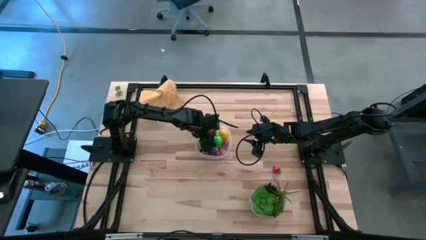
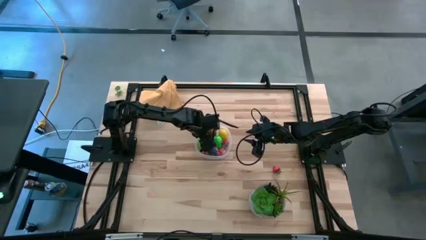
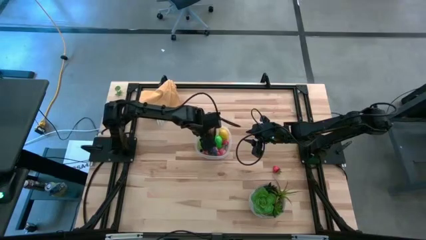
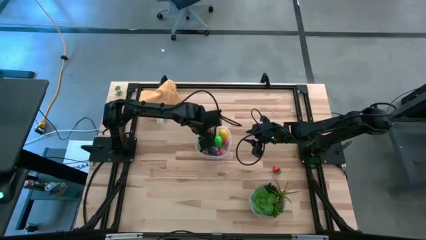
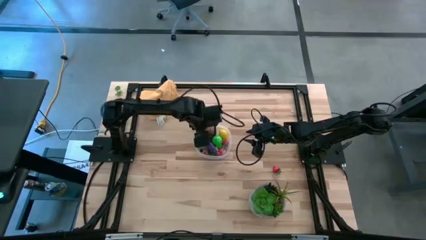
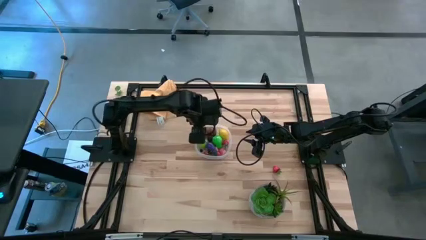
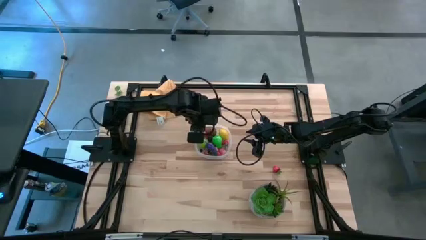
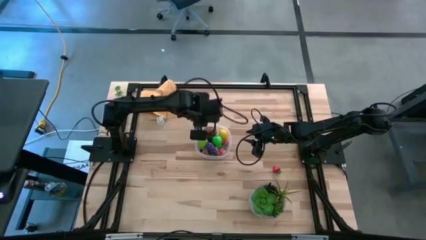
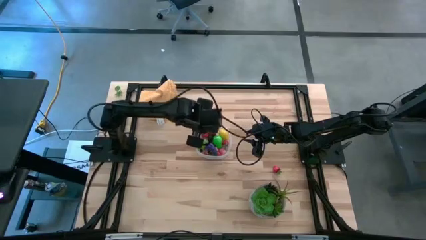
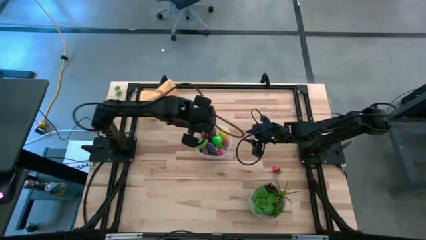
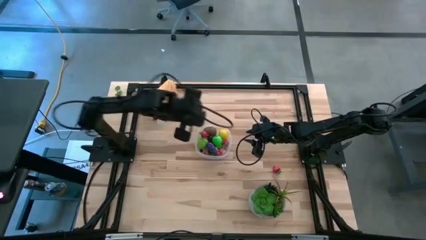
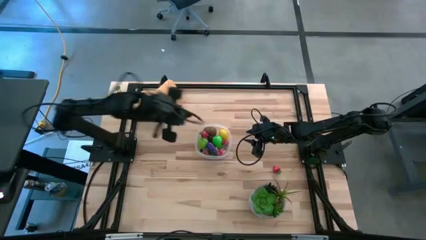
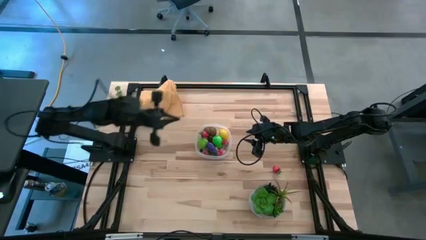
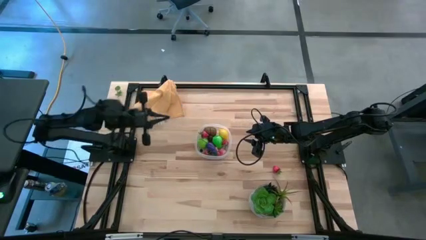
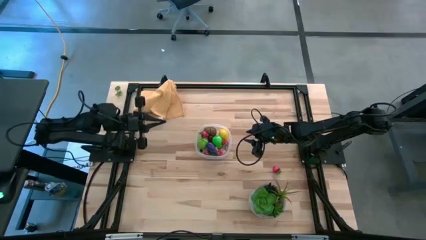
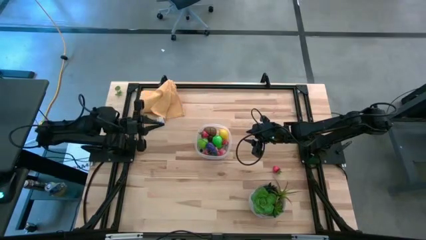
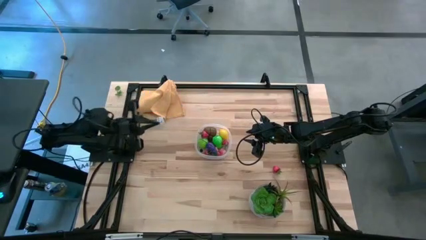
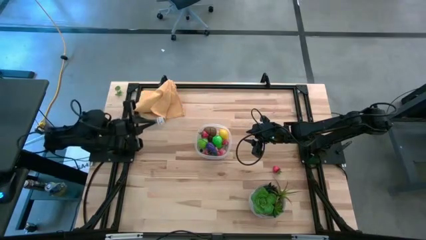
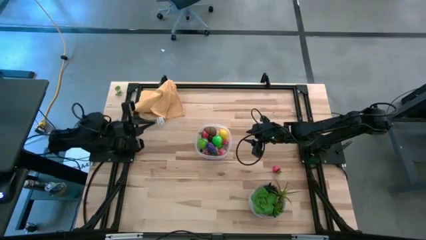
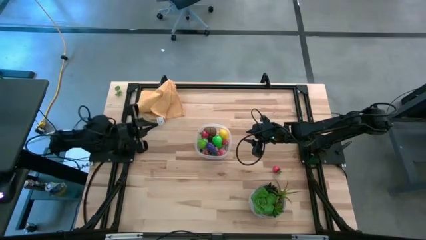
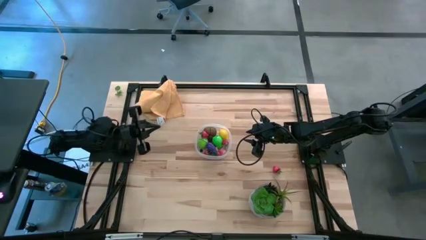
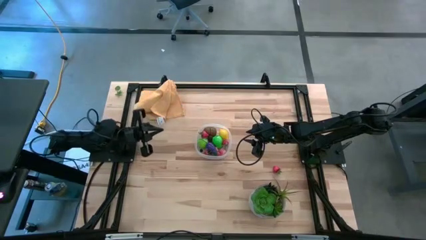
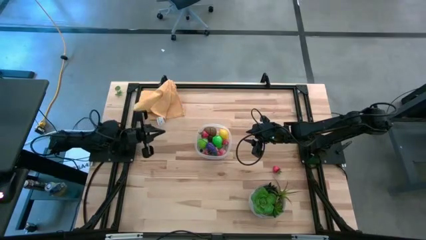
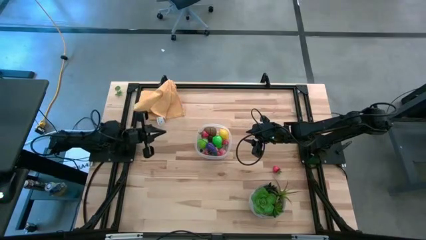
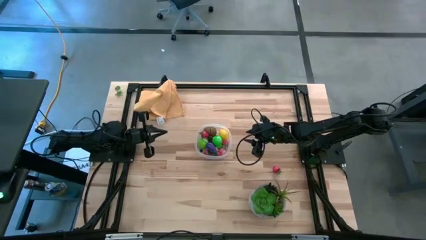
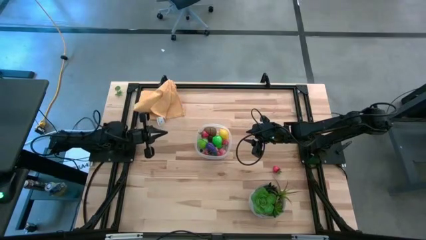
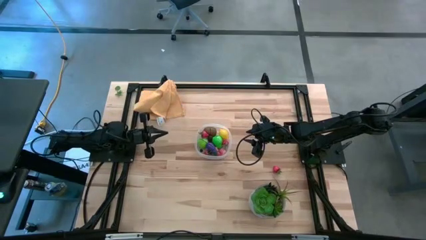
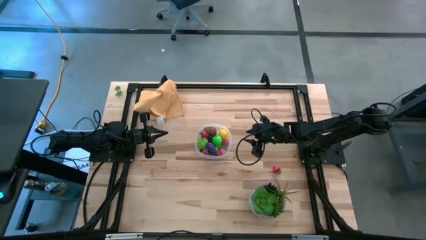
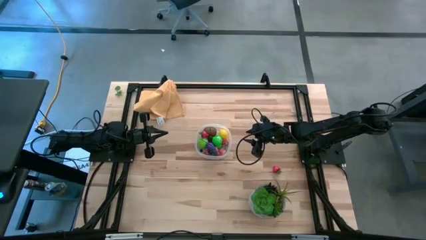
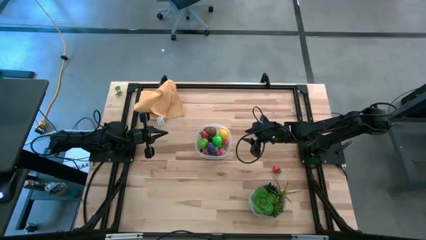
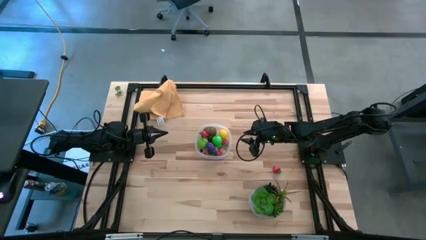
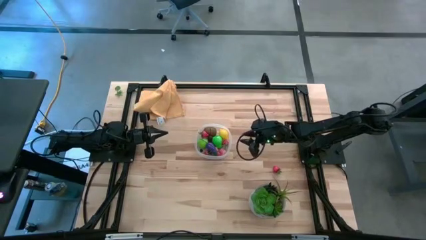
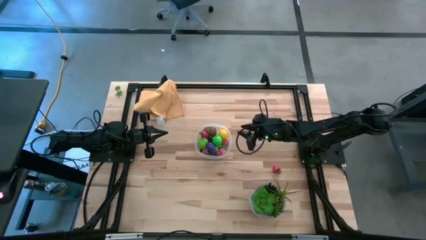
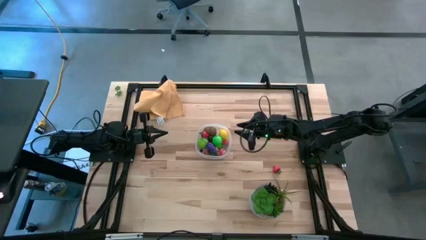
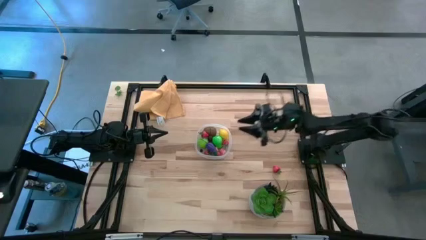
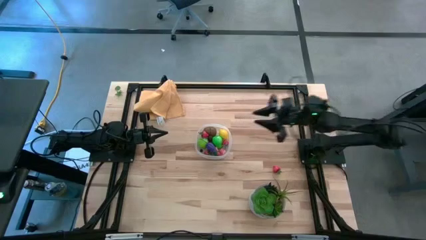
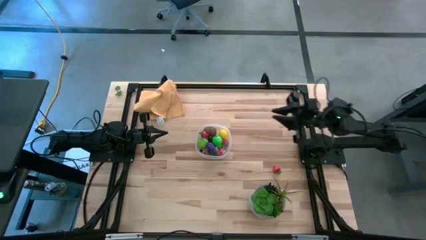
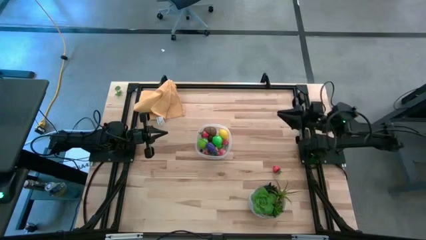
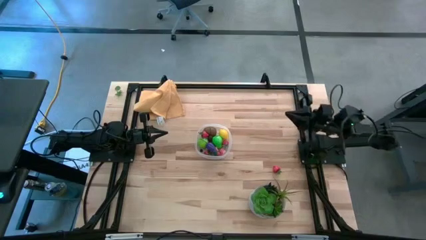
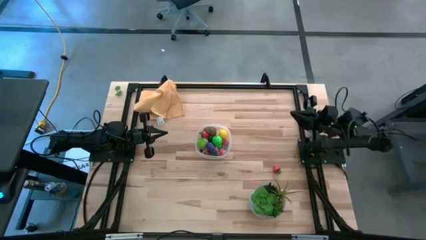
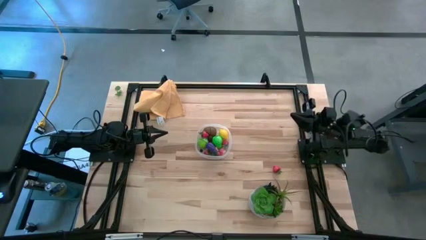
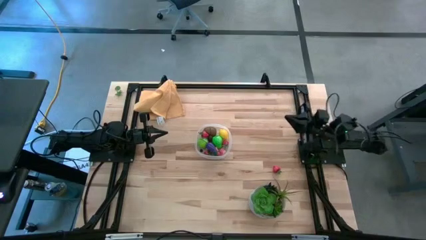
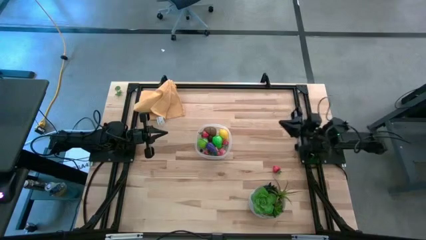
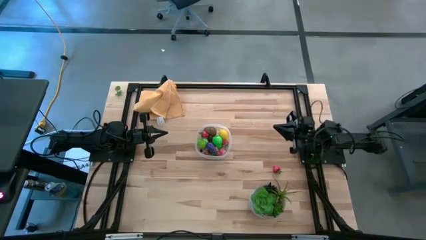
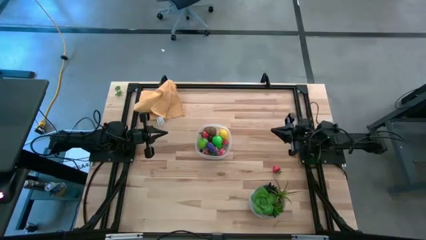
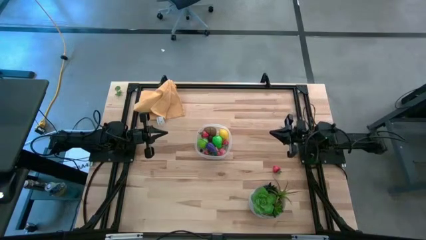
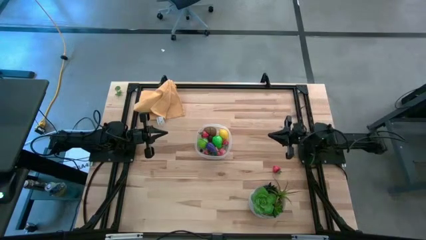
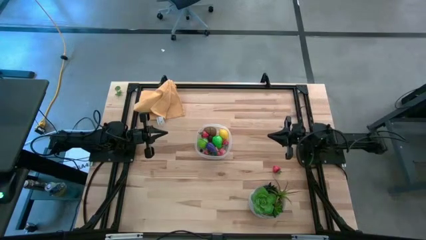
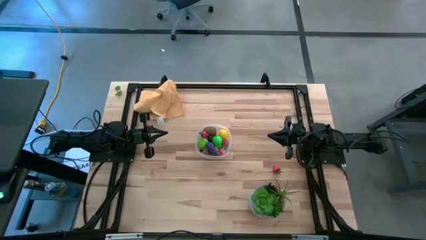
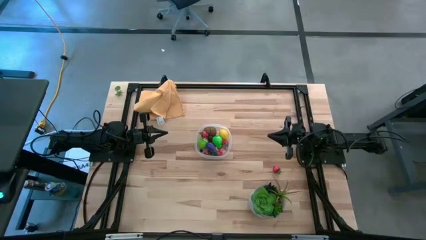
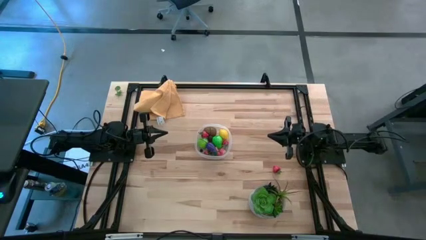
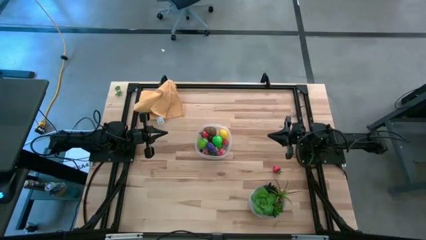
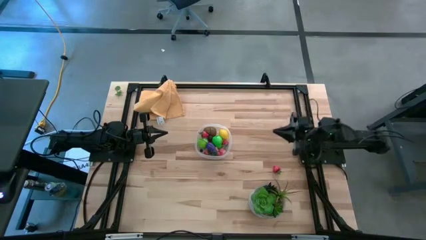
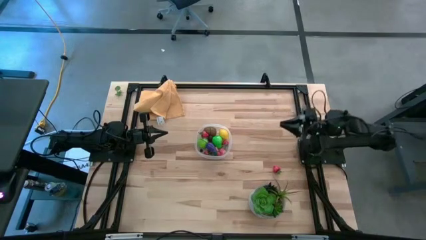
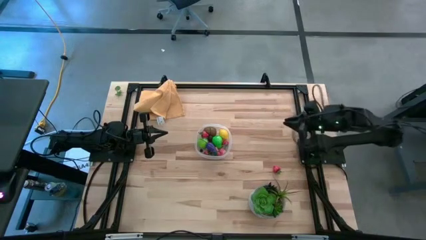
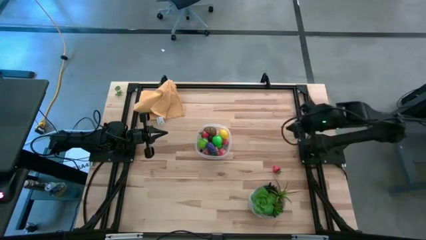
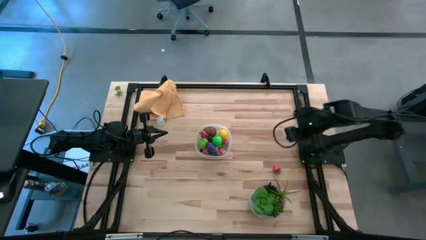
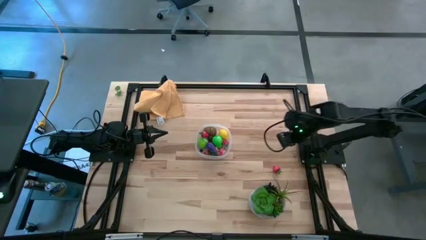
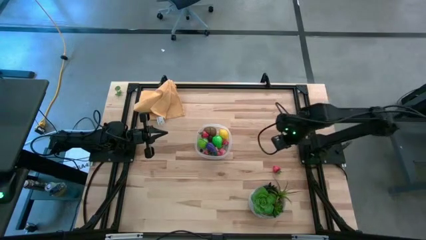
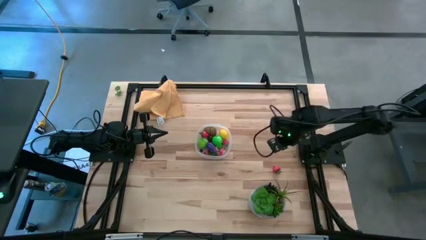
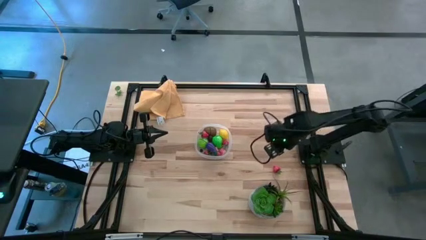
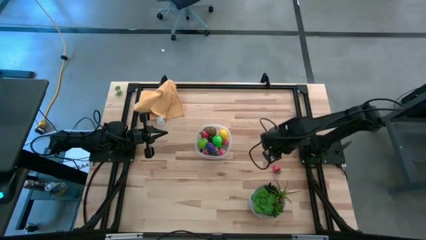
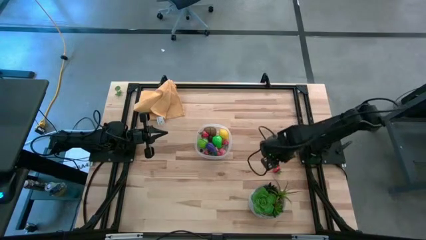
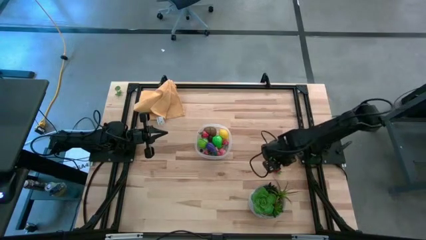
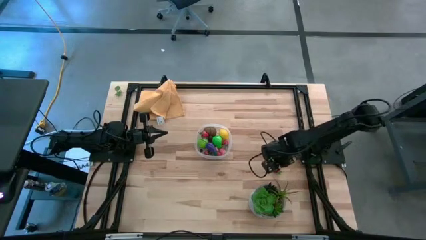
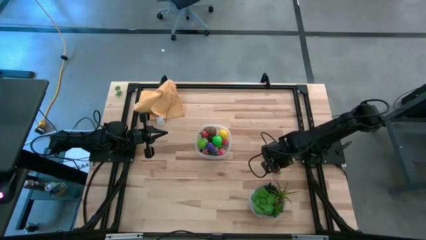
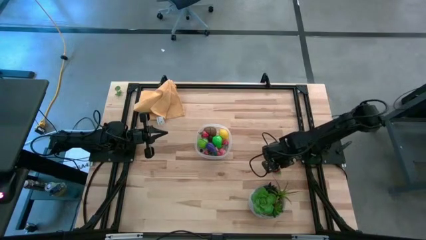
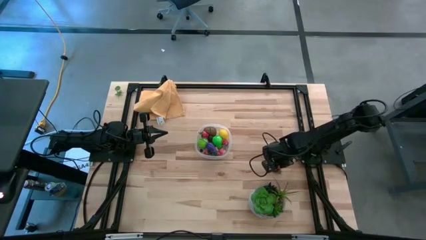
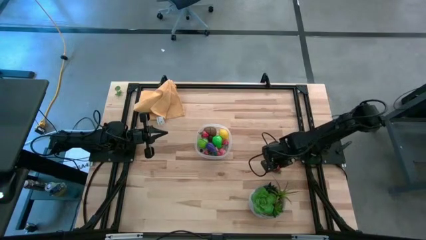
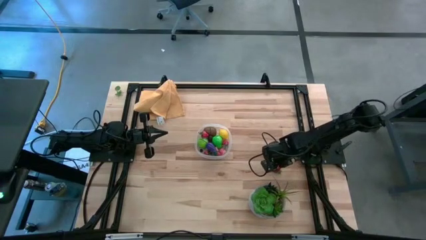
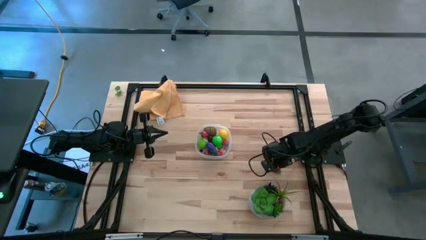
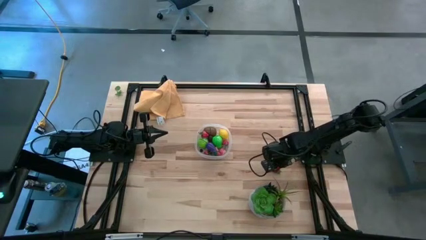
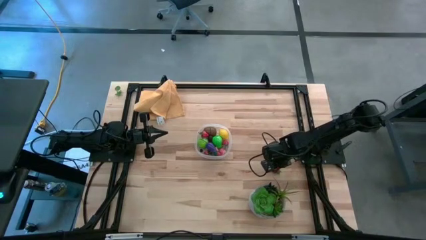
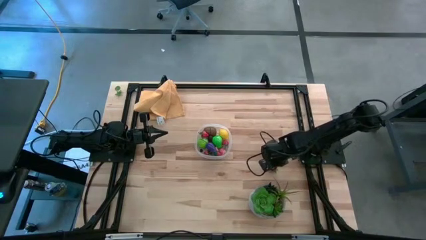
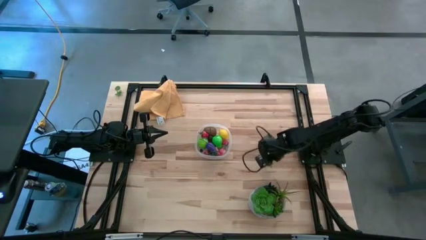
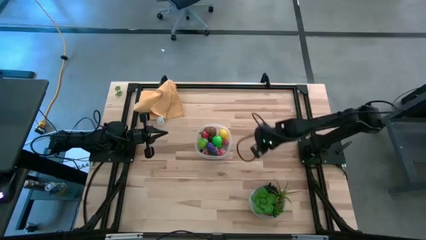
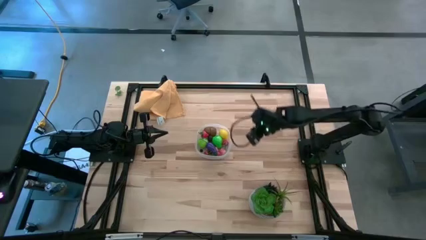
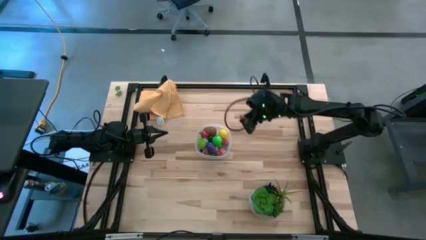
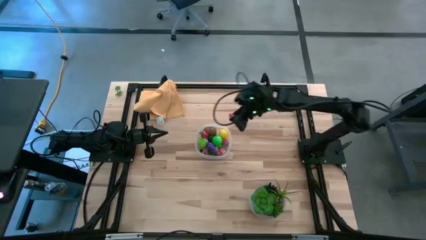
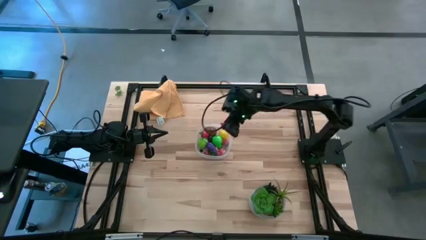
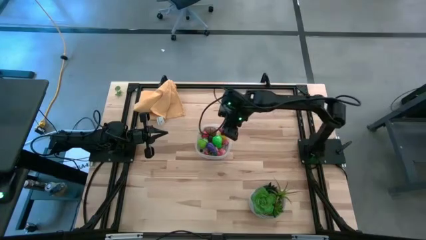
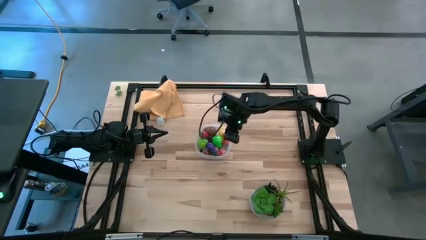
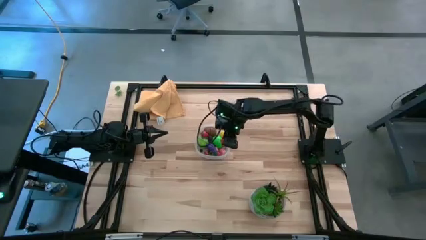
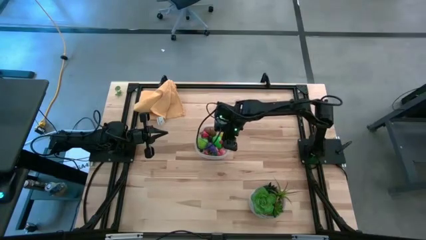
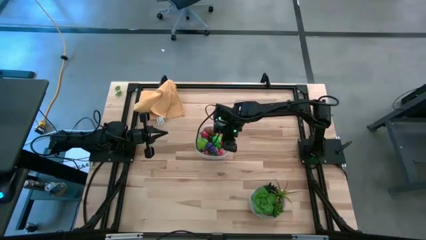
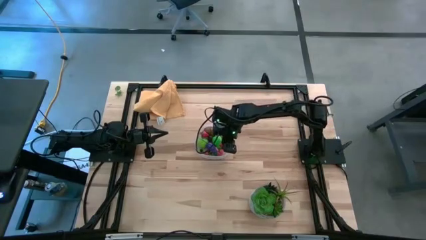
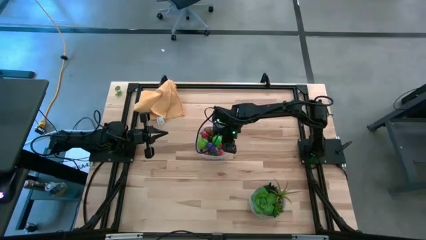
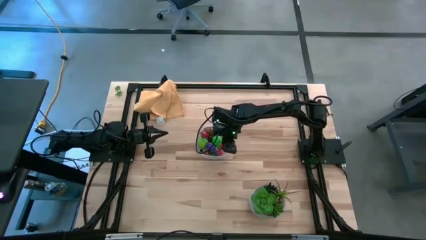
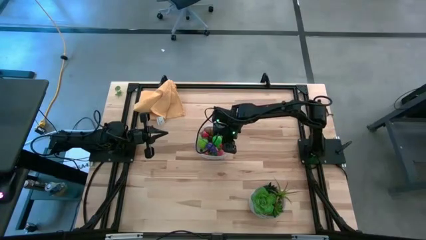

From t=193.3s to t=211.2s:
Task: Pick and placing Produce into tupperware
Put the strawberry into the transparent bin
